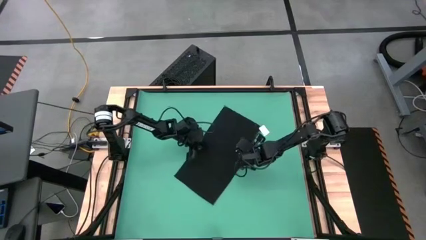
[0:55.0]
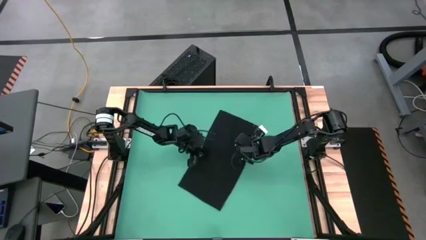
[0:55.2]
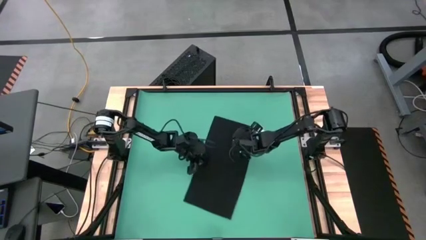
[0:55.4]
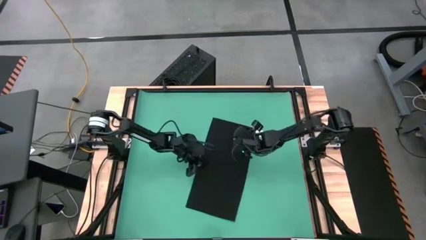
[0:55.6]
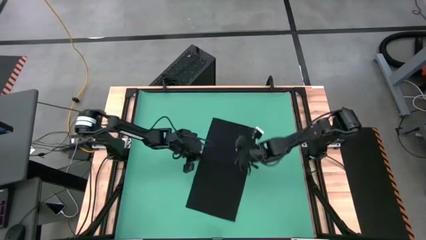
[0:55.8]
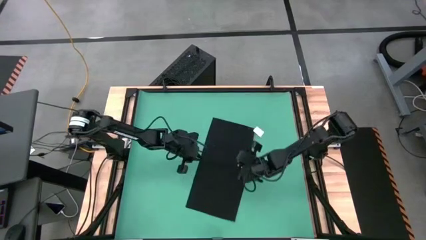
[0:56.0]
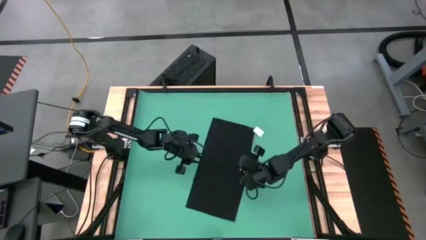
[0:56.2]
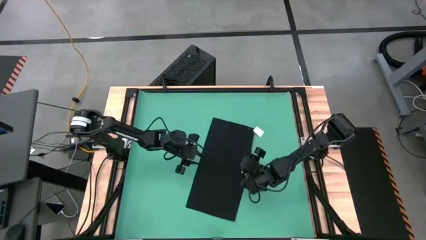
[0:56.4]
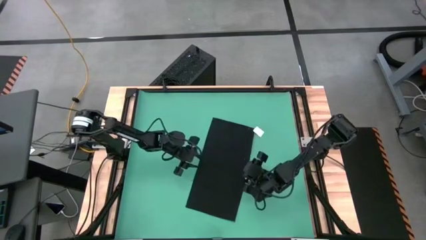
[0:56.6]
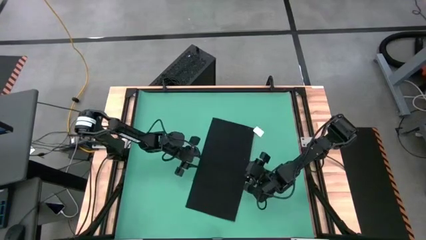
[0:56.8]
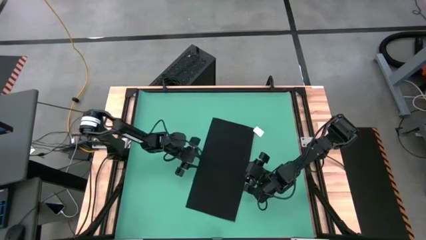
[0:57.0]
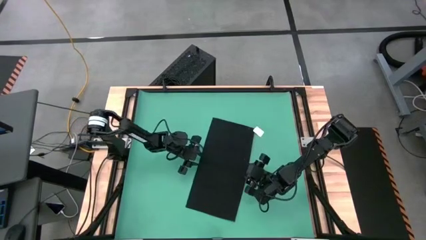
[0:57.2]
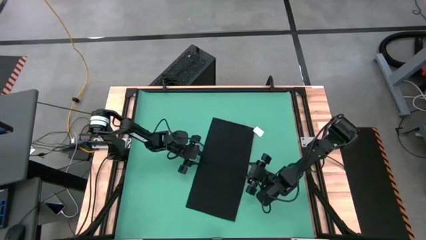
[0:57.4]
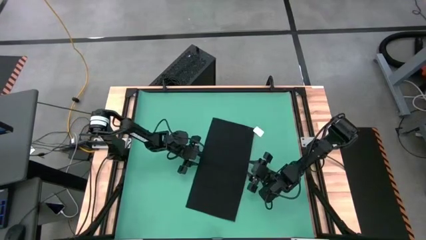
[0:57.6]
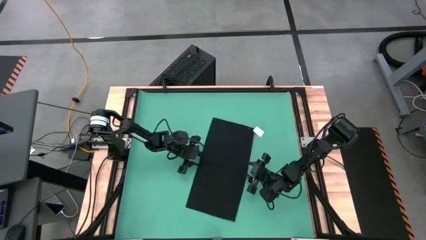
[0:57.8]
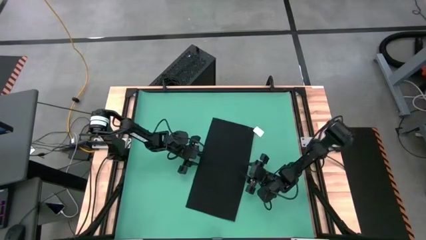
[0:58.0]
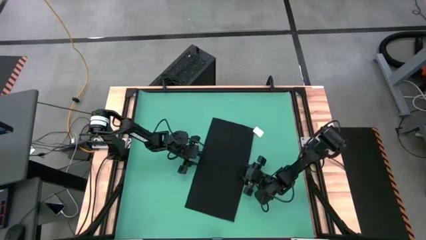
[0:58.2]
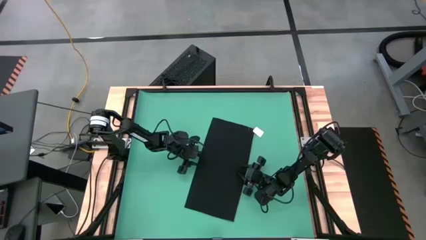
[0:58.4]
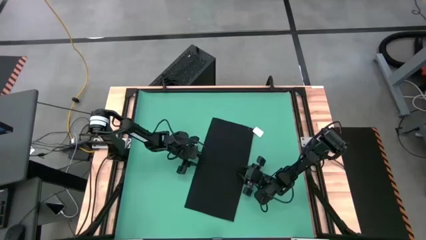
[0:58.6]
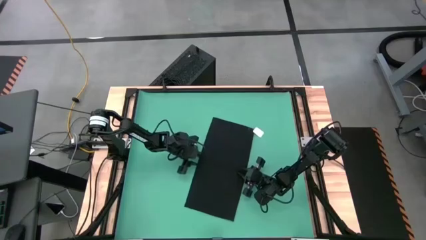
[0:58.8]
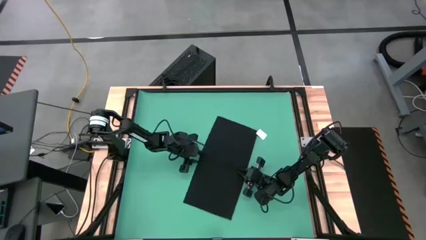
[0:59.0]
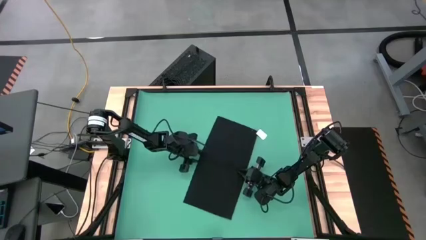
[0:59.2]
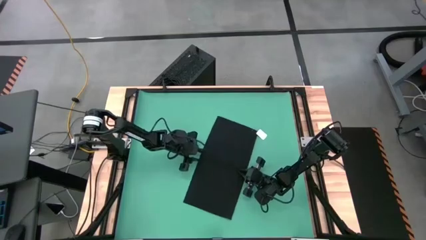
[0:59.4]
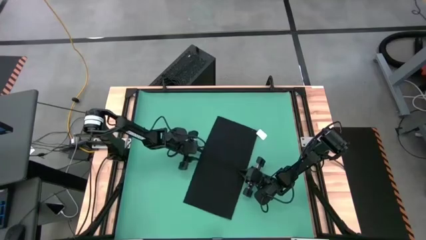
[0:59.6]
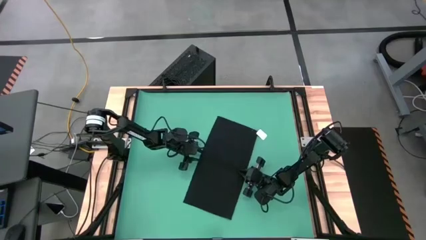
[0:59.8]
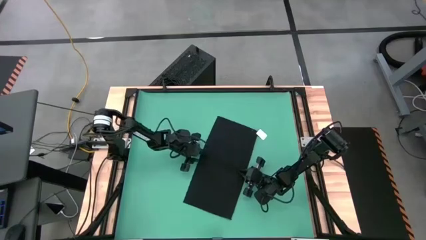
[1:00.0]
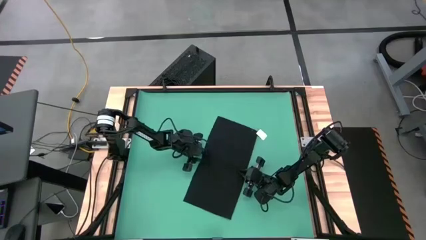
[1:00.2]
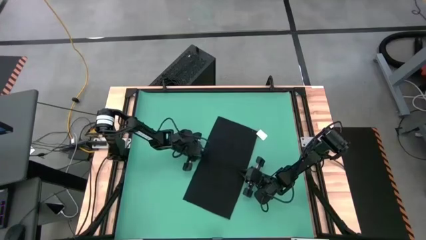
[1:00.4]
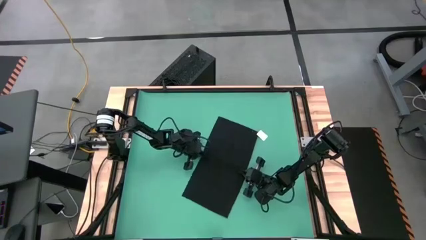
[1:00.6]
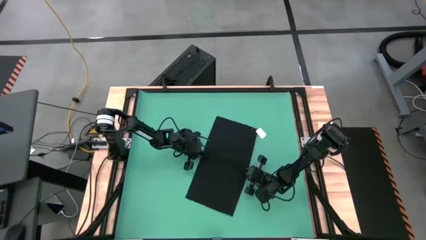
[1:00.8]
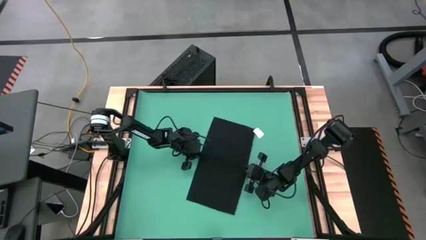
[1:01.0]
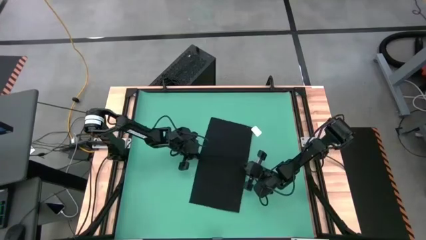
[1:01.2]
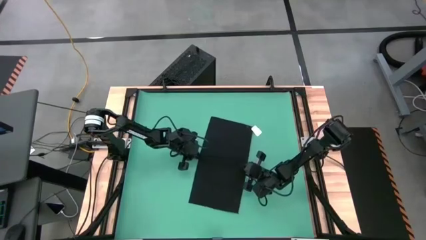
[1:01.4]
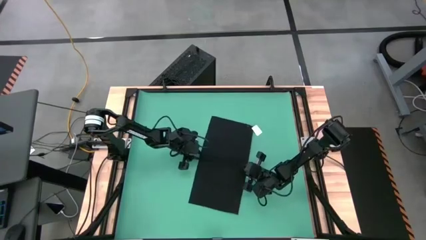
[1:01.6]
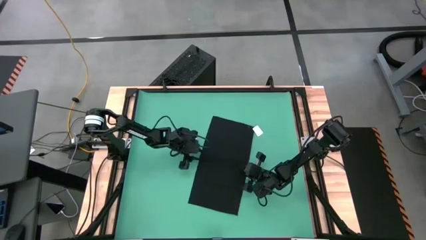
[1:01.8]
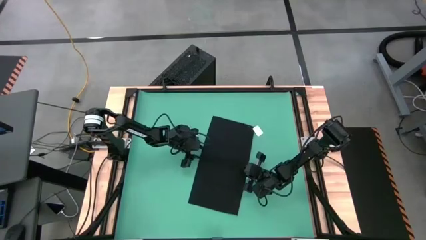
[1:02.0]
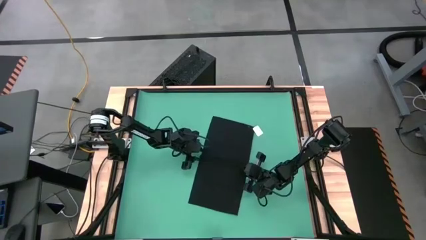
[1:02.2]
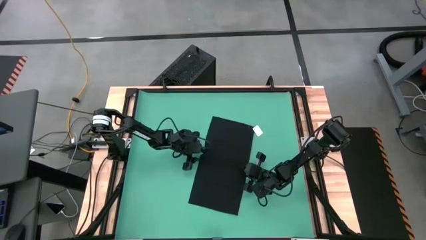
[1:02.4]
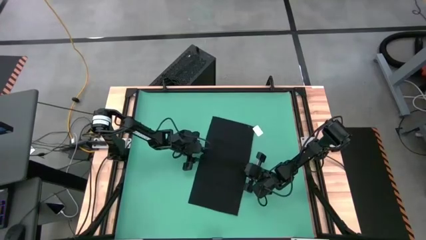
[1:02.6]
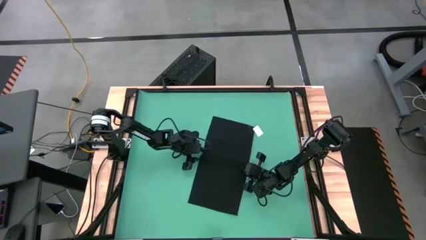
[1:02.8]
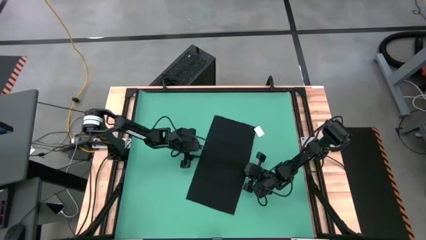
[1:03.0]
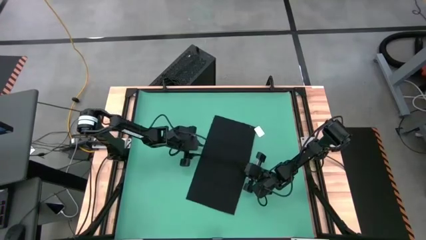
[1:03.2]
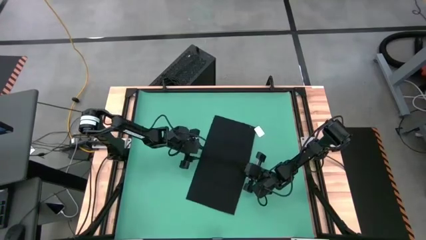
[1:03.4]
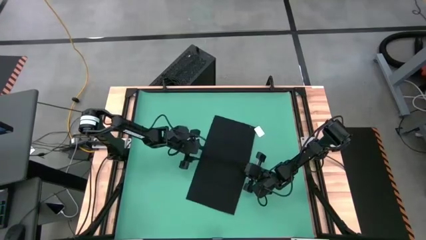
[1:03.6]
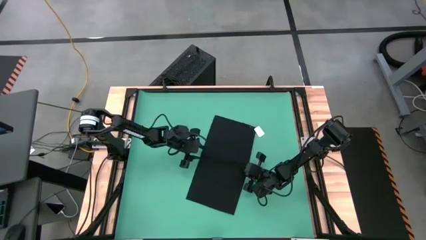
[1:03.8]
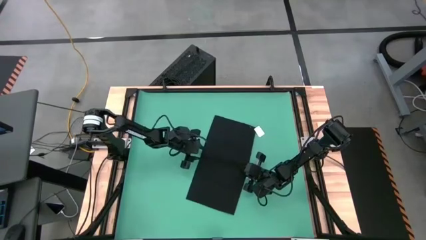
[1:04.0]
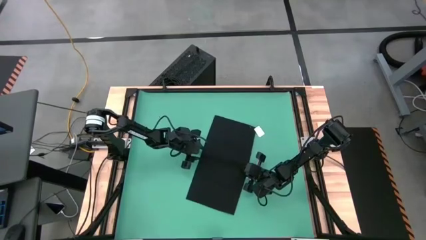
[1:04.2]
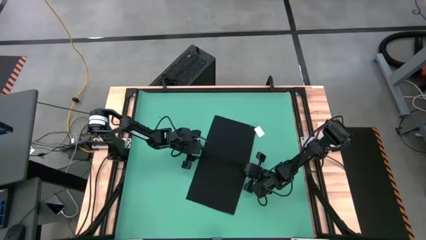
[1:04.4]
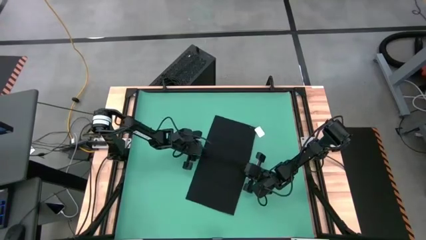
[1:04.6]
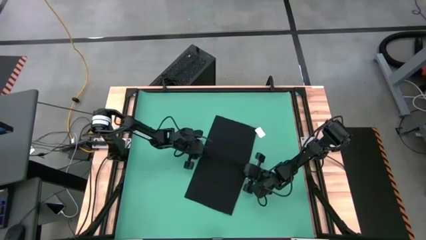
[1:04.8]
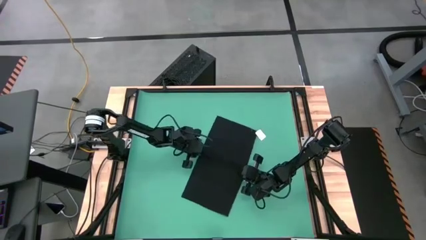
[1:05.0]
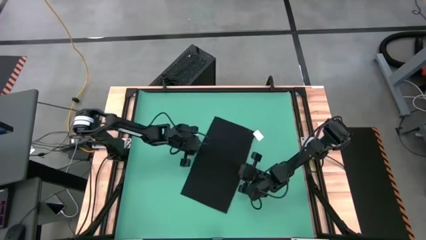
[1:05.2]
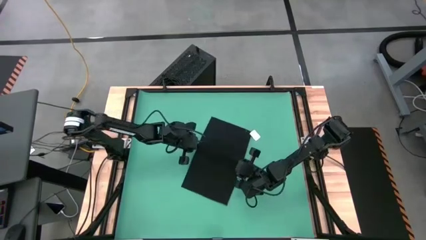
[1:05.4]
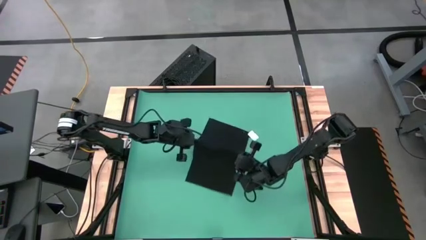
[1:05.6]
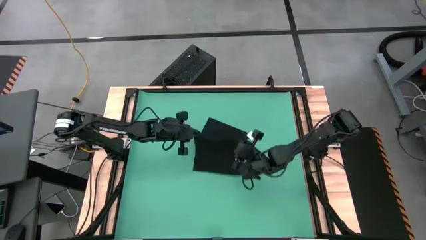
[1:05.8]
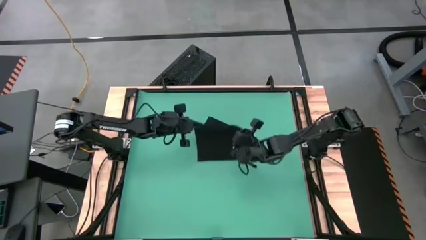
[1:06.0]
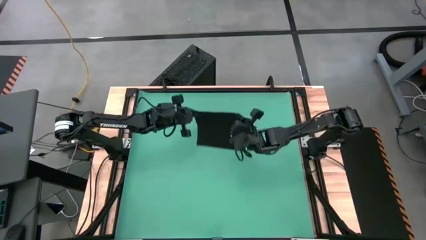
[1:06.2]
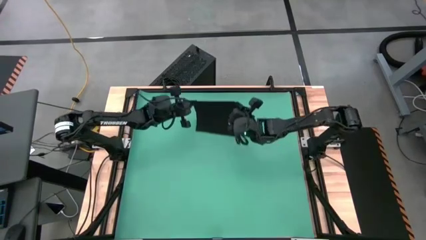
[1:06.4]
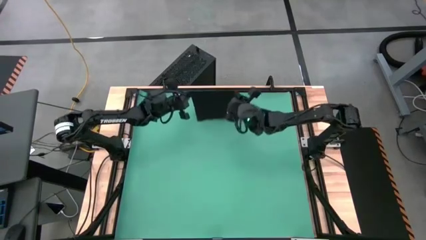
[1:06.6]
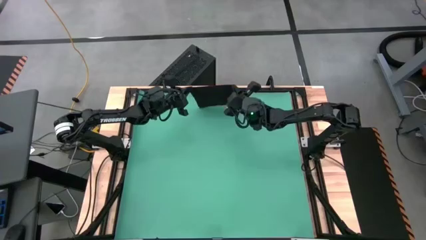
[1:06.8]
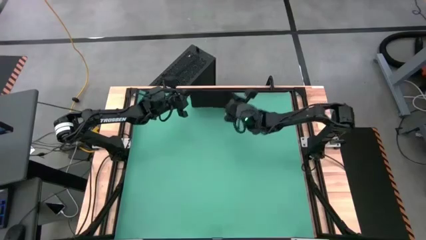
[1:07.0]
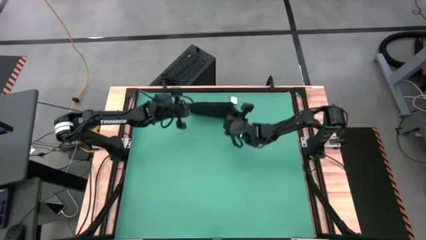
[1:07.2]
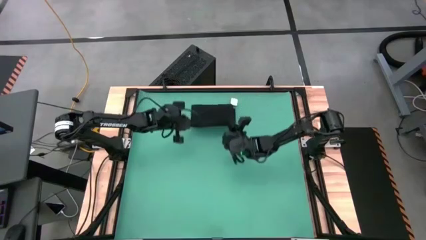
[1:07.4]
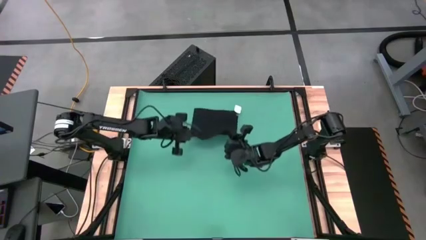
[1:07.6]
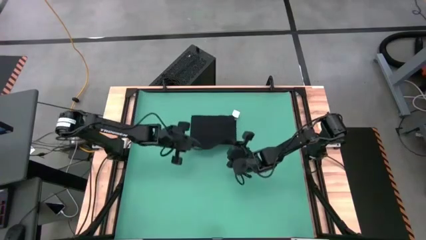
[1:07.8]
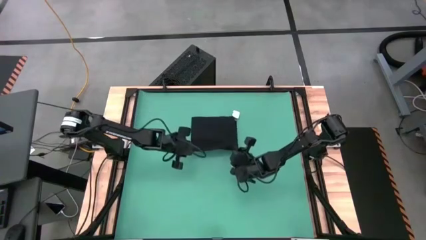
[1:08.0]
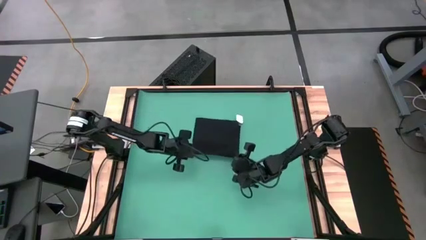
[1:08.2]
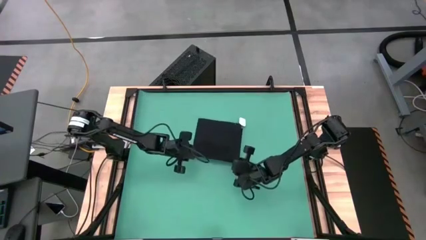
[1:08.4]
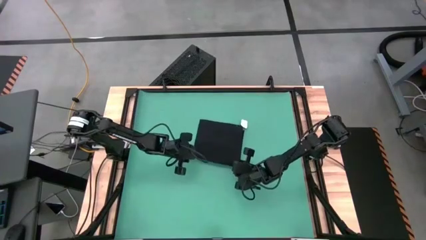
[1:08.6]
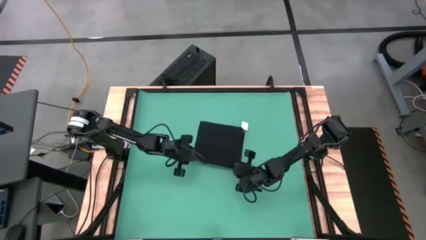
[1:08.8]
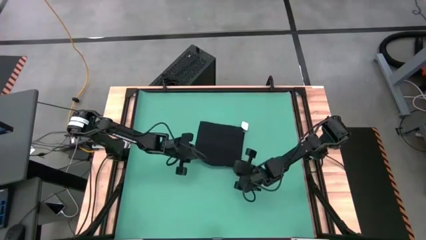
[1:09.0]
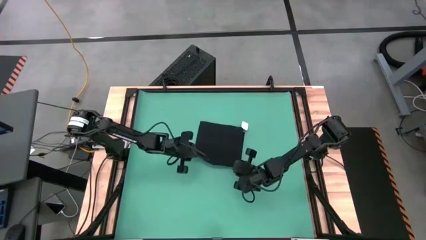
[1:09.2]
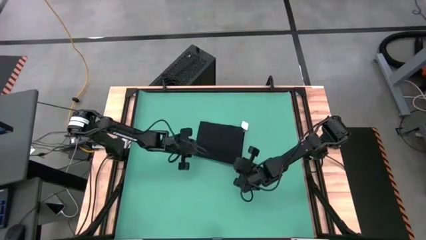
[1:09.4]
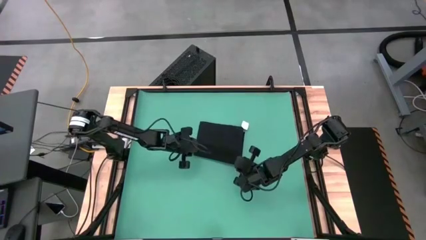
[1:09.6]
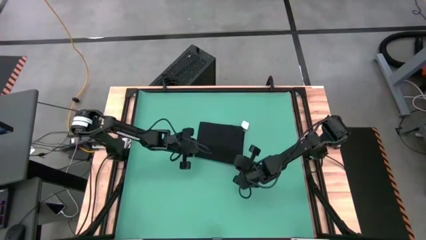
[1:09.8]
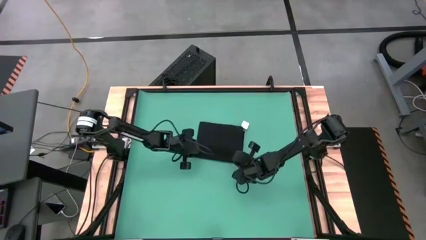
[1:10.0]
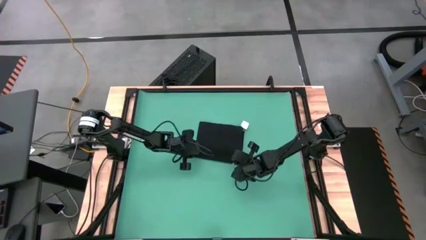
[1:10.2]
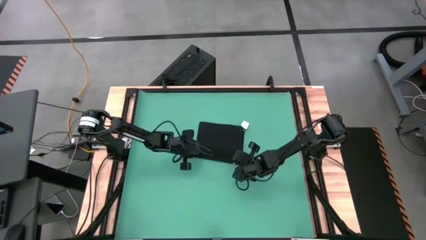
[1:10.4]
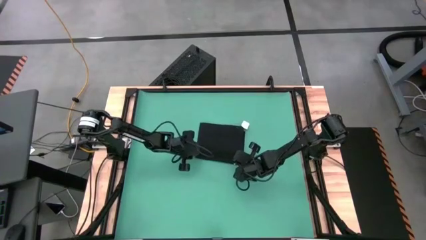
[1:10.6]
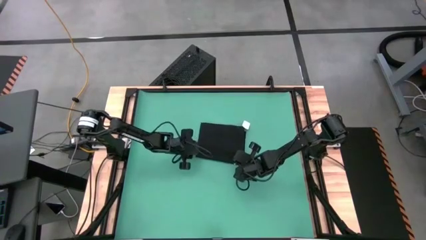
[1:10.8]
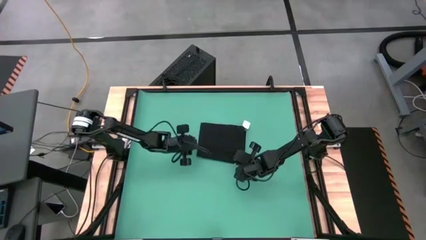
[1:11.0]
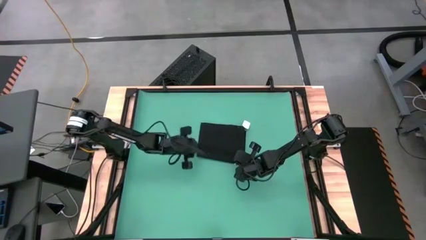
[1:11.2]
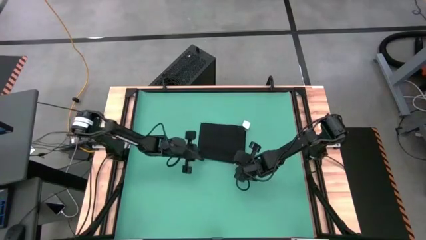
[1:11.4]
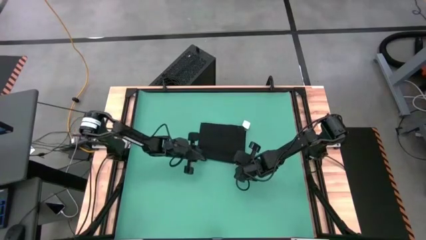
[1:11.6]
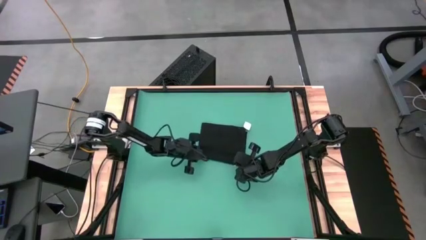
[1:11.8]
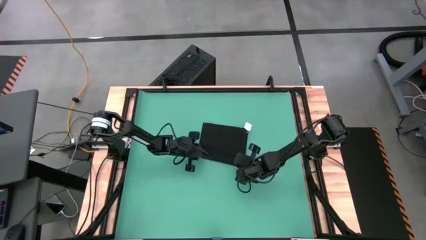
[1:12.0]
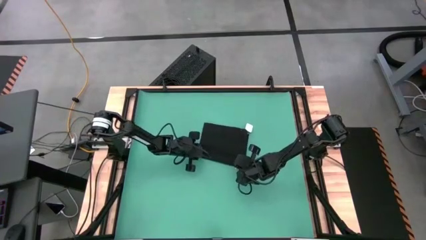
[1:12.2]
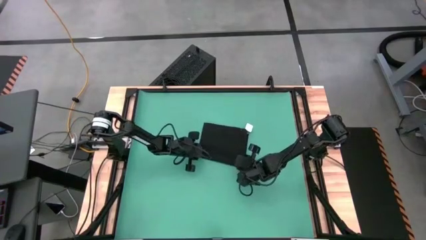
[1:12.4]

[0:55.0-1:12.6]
Task: Roll towel
Fold the black towel
